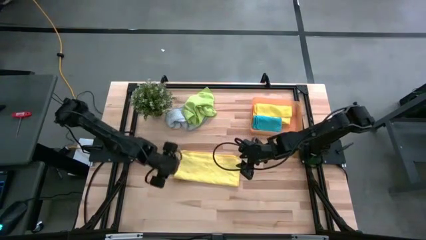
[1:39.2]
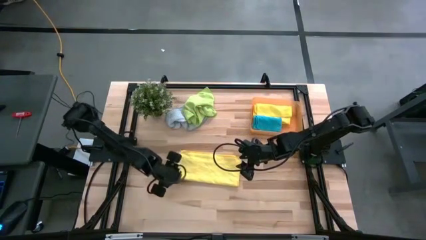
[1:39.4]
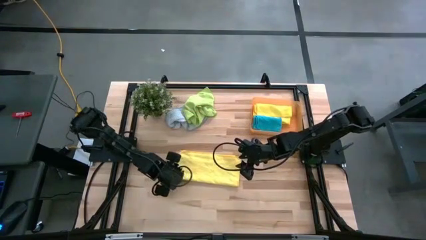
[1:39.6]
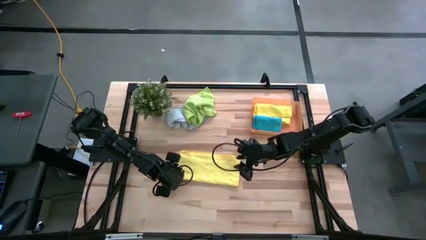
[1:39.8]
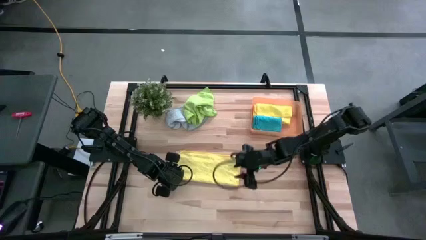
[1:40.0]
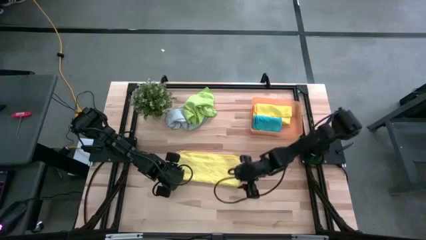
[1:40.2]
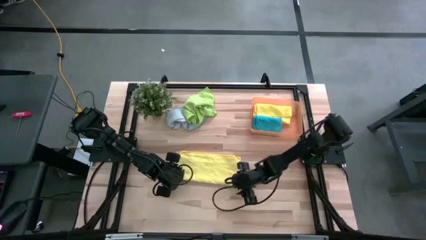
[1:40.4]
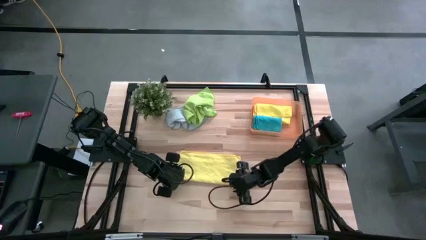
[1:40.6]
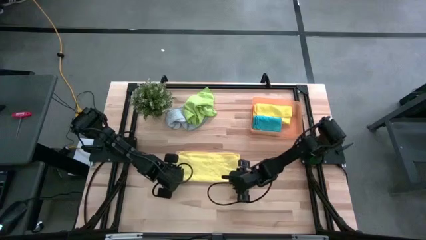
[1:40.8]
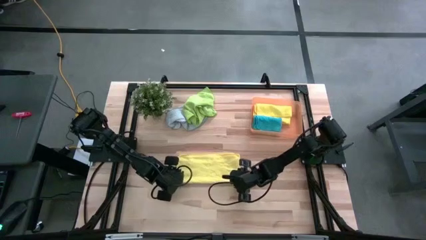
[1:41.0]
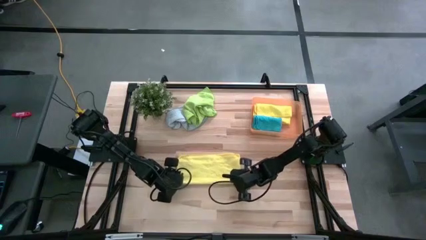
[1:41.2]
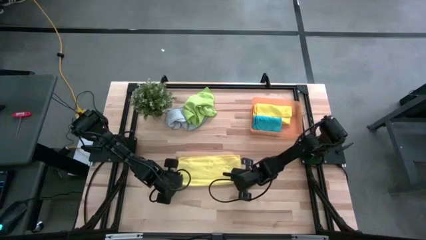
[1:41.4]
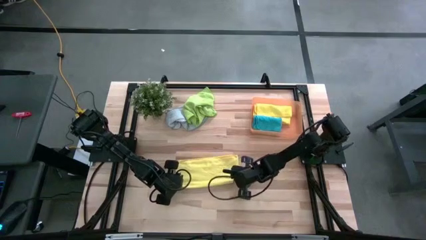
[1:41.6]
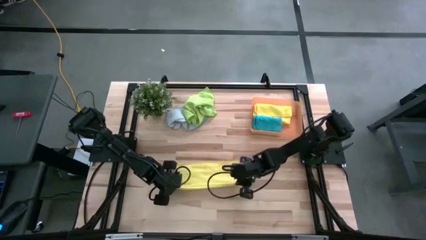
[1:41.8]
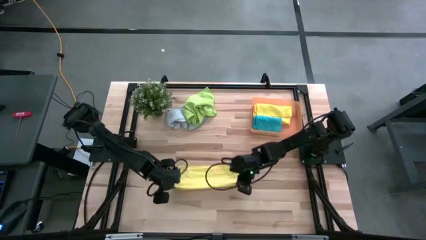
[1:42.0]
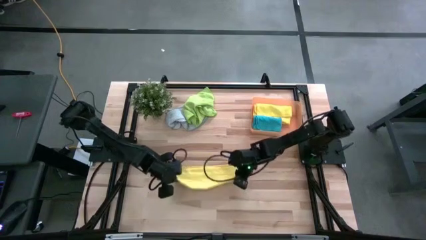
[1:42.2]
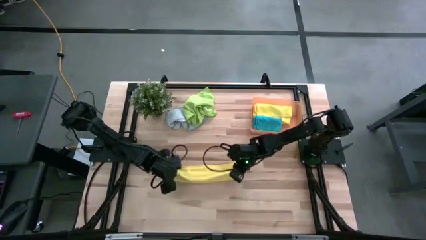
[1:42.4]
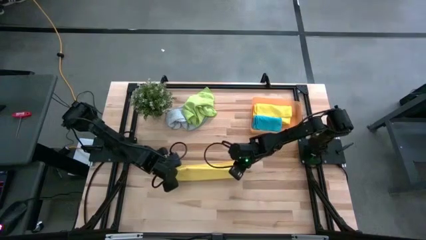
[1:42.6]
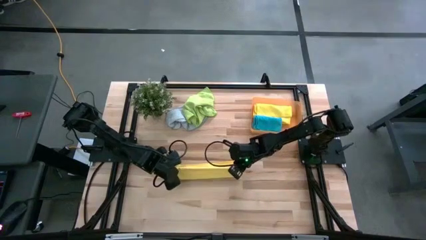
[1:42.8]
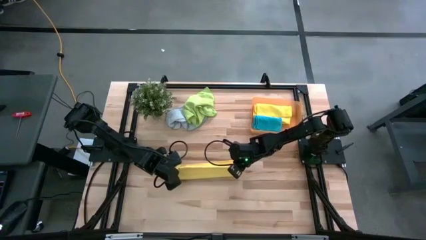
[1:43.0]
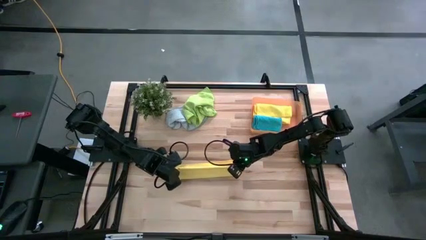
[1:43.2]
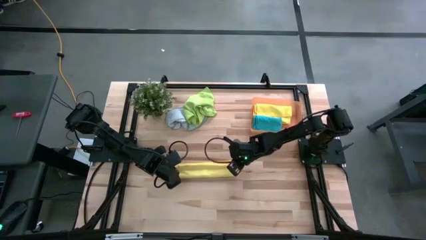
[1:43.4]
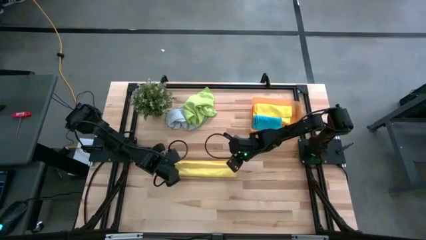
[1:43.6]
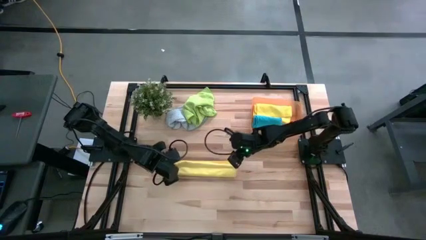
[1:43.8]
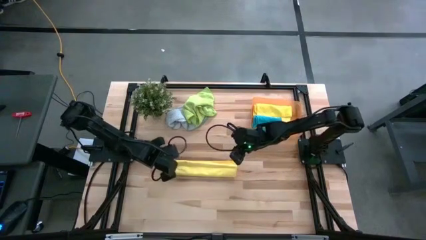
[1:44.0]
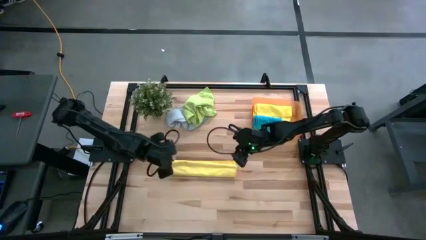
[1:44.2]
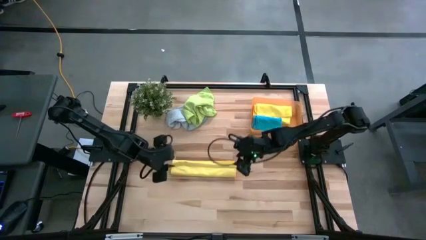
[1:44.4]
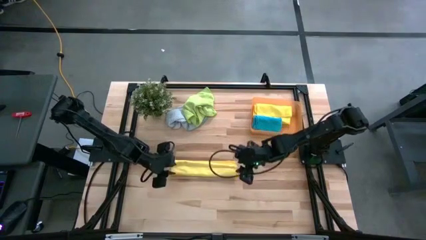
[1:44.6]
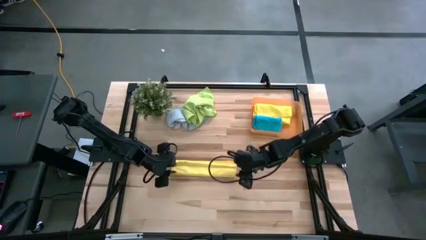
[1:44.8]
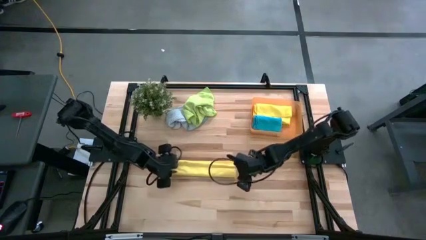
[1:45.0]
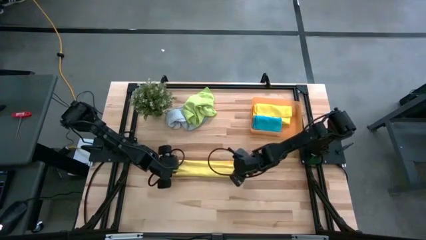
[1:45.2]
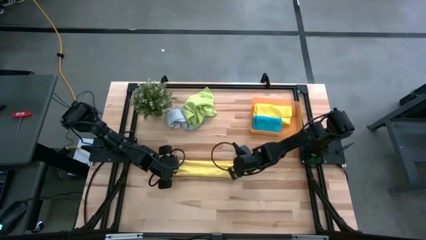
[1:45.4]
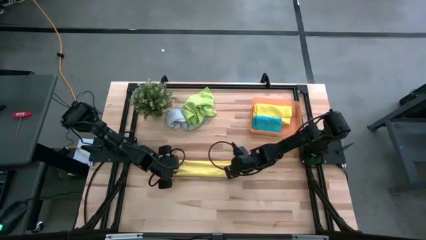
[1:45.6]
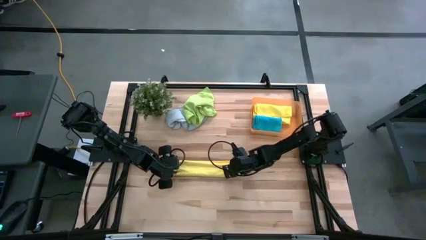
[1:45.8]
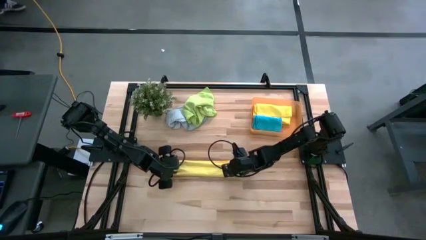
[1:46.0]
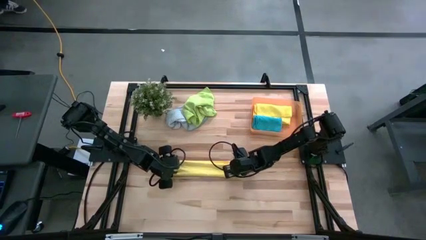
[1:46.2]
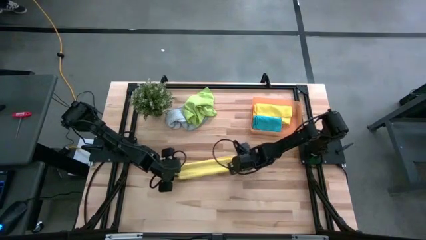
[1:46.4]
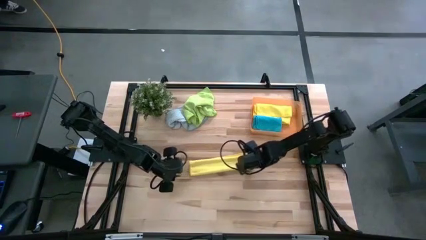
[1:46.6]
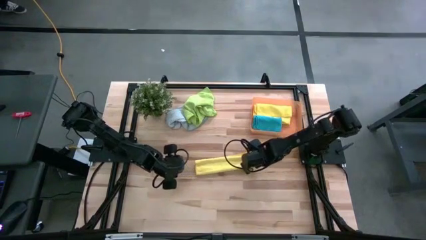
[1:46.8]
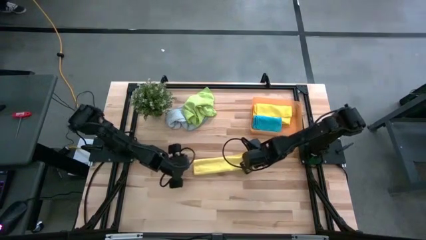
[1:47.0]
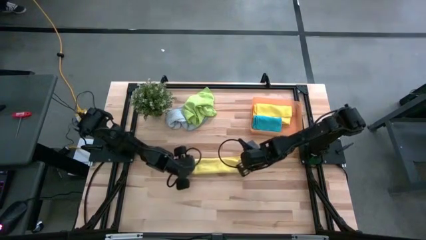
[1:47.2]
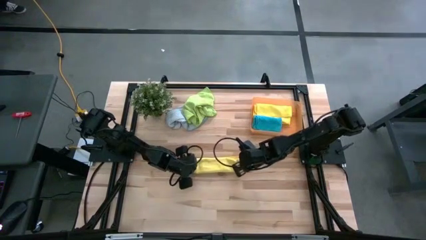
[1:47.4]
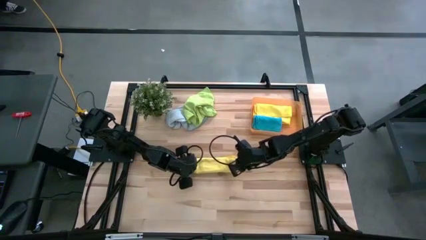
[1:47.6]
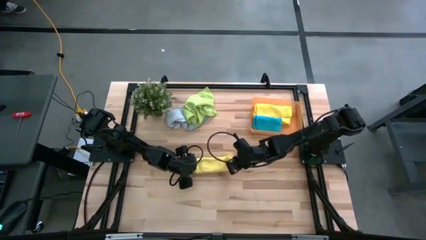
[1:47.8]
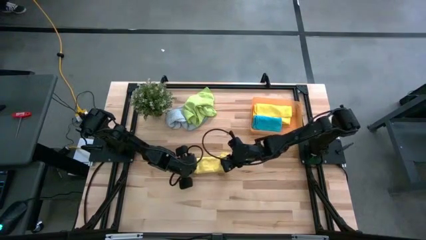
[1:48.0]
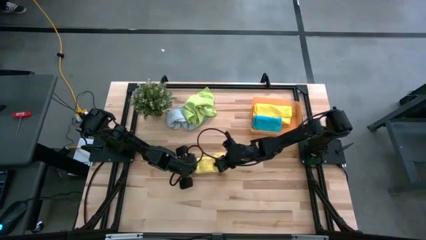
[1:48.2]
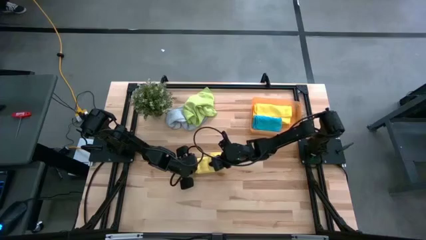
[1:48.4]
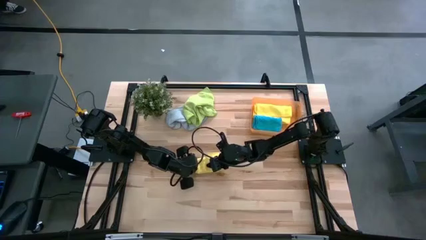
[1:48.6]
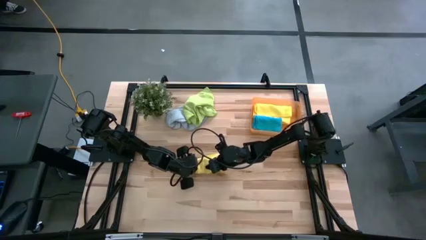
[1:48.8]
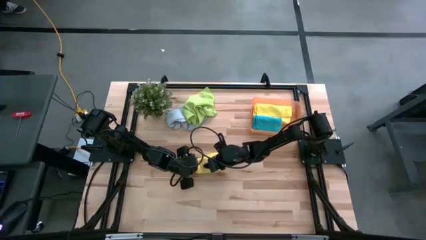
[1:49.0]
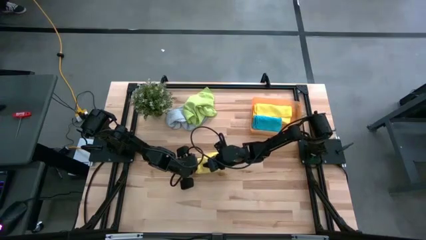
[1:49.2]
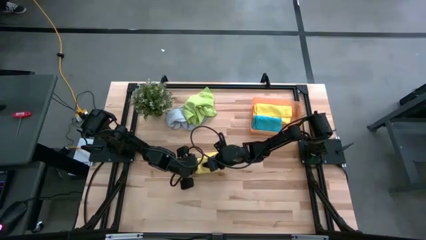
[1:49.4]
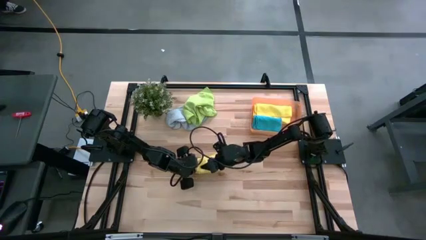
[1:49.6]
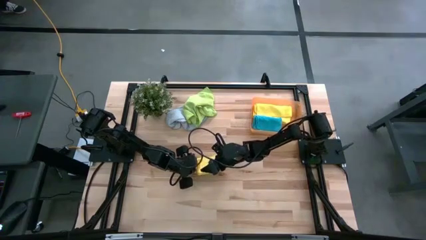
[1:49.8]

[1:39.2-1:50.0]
Task: Fold microfiber towels
Fold the yellow microfiber cloth

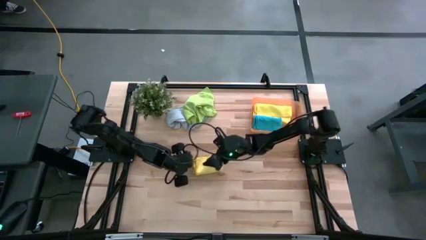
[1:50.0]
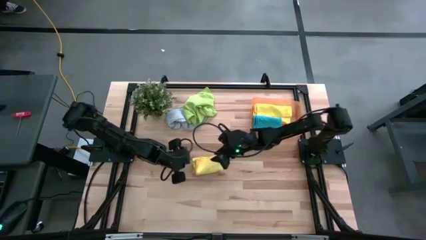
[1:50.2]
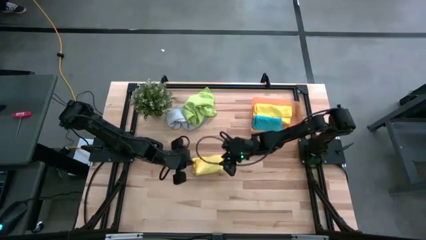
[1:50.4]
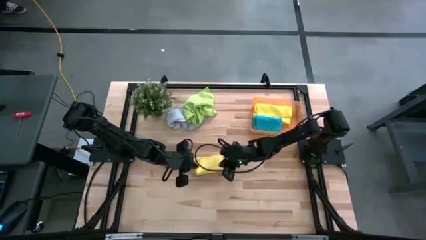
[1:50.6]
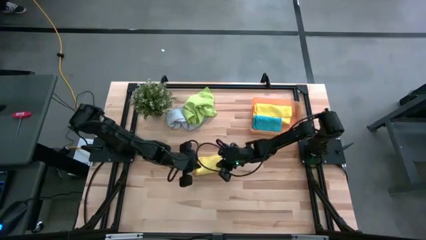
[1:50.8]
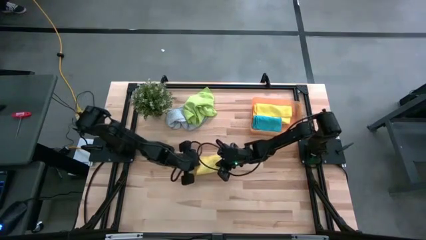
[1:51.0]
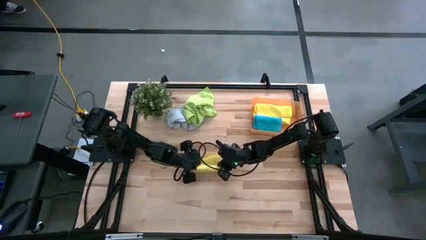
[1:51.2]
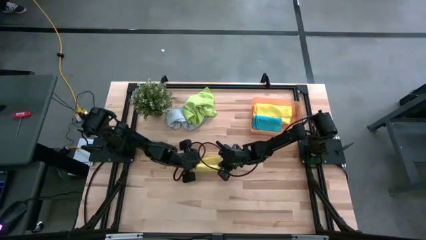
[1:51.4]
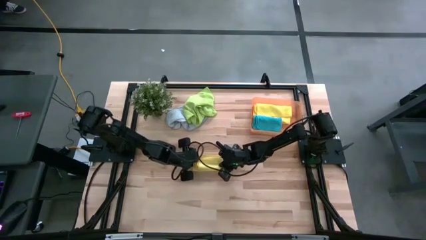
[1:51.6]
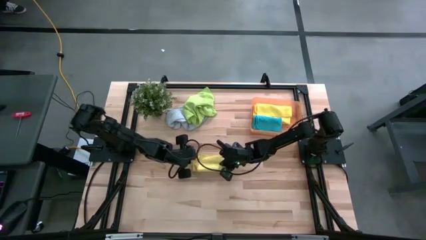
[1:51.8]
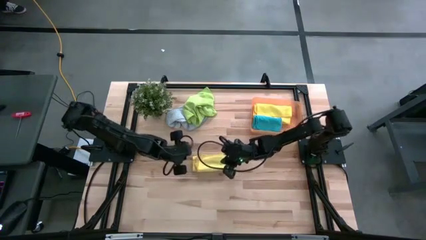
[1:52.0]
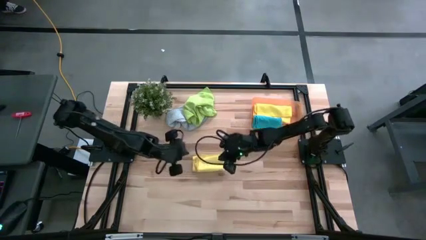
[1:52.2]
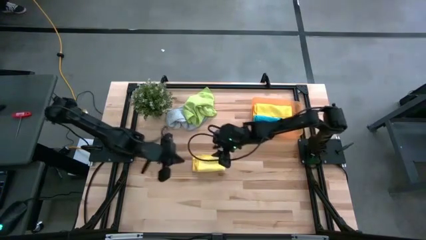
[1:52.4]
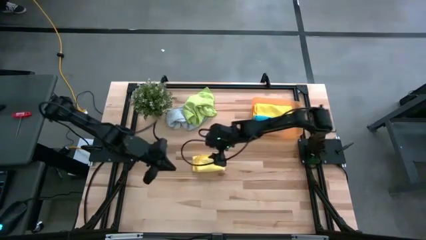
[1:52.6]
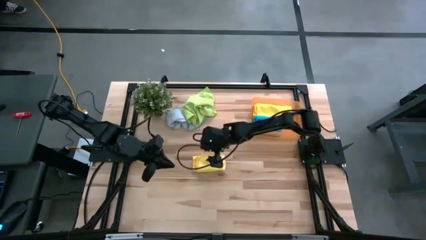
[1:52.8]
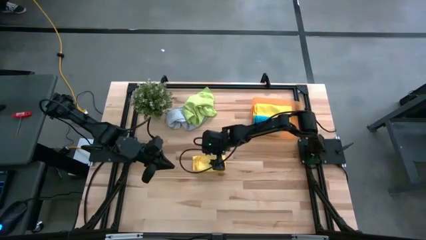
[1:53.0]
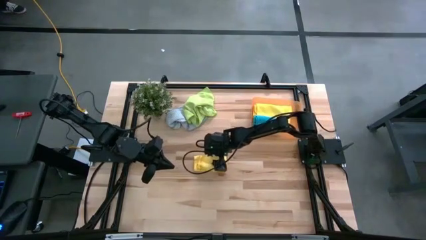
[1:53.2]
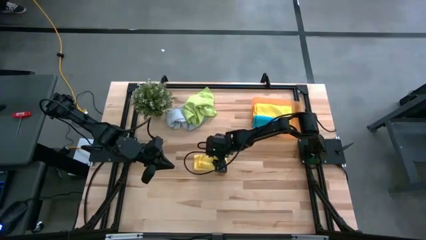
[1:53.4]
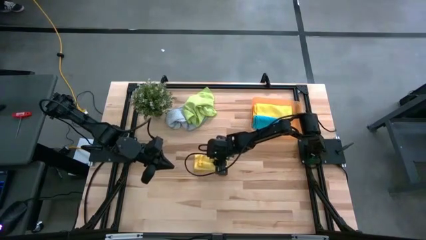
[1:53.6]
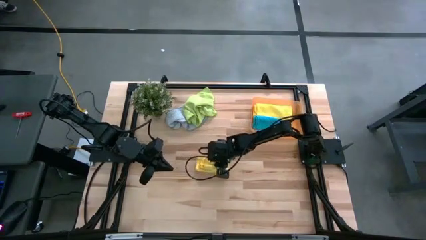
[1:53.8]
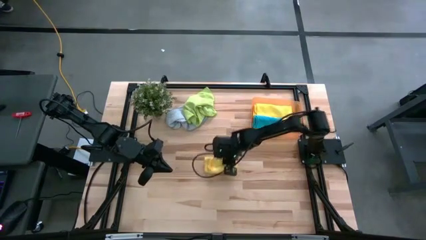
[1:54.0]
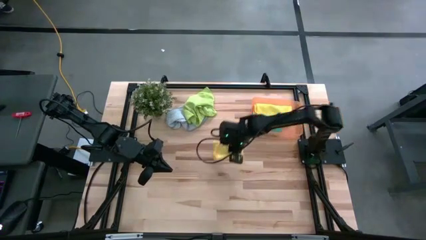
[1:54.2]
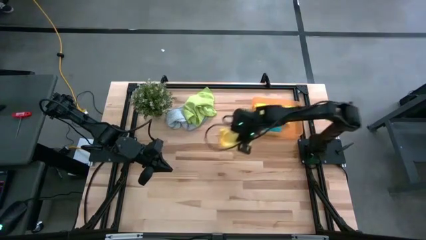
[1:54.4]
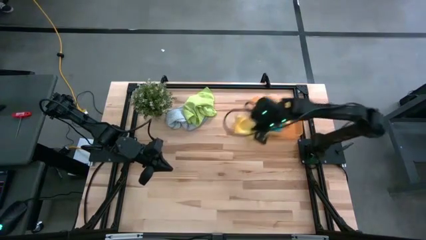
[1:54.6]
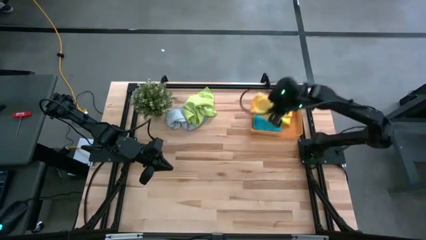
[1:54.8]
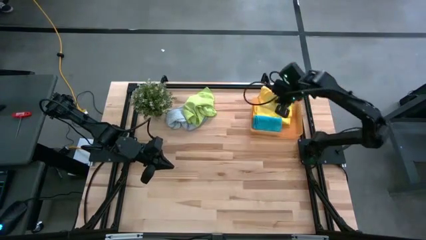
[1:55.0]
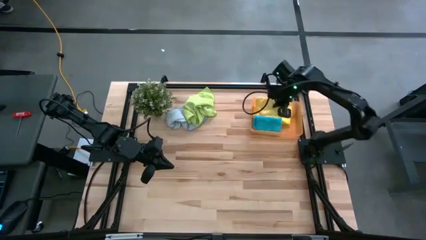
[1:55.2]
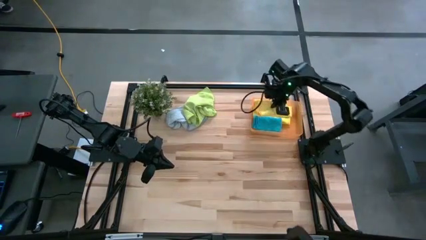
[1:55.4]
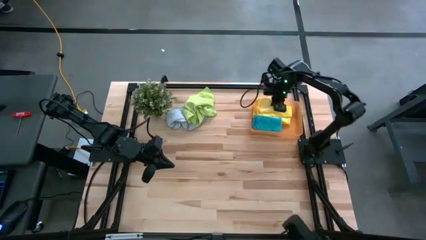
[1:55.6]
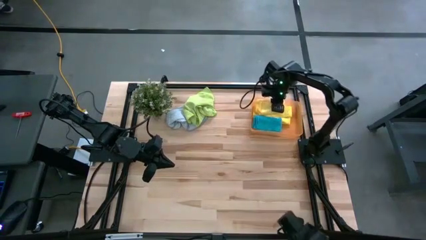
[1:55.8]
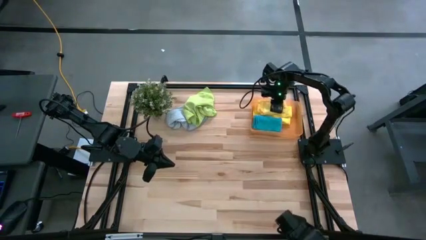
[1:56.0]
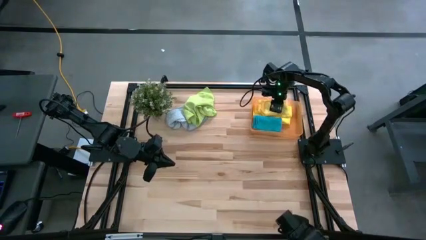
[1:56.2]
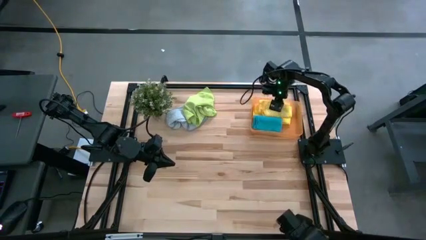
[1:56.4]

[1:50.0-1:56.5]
Put the yellow microfiber cloth into the orange bin
